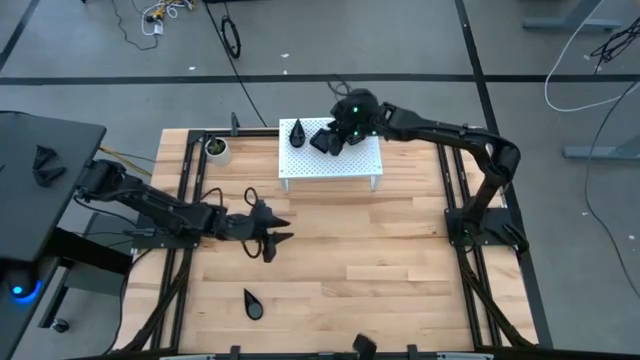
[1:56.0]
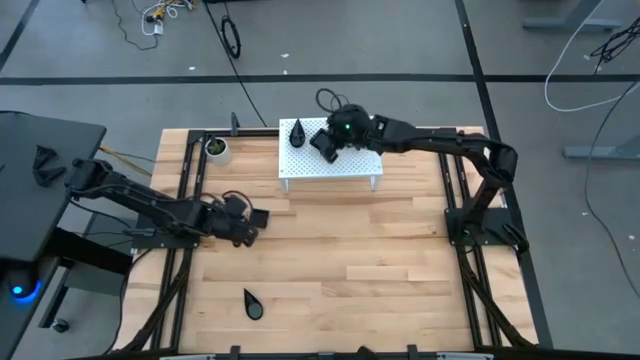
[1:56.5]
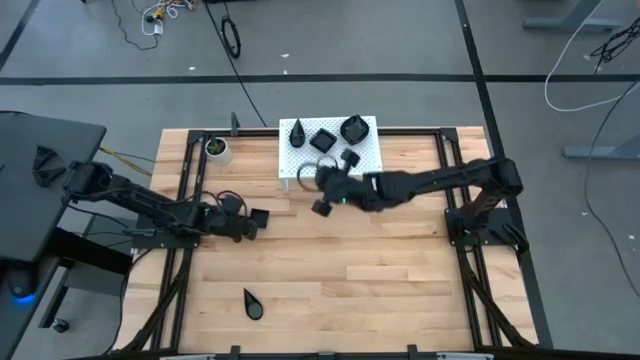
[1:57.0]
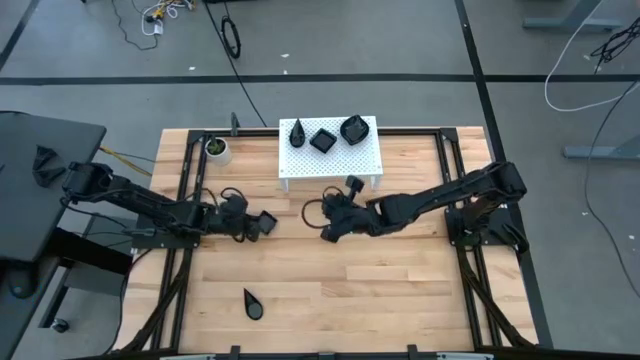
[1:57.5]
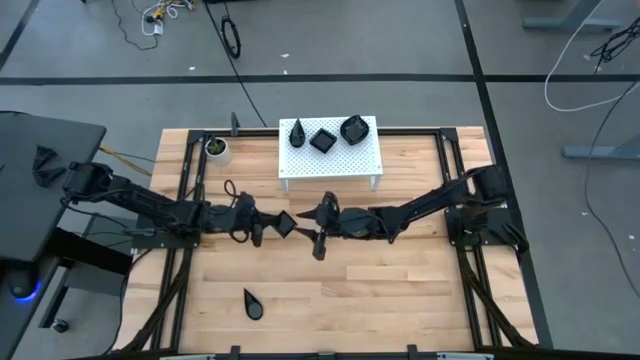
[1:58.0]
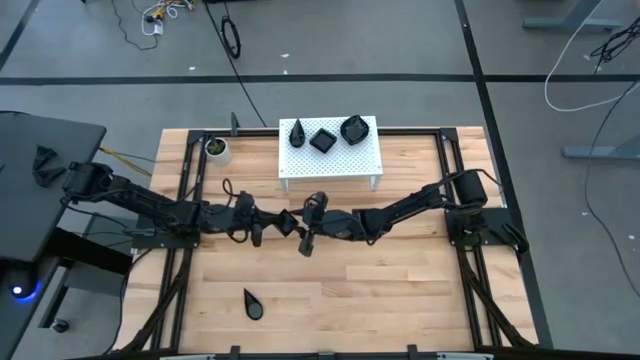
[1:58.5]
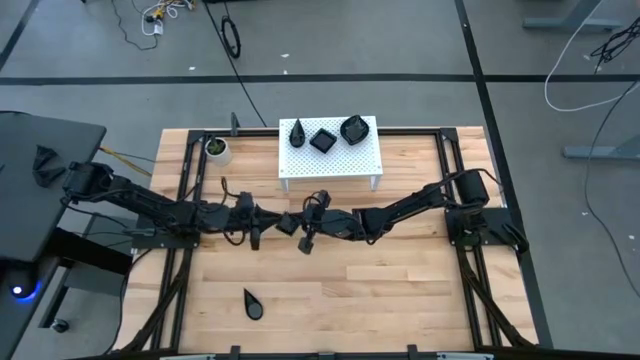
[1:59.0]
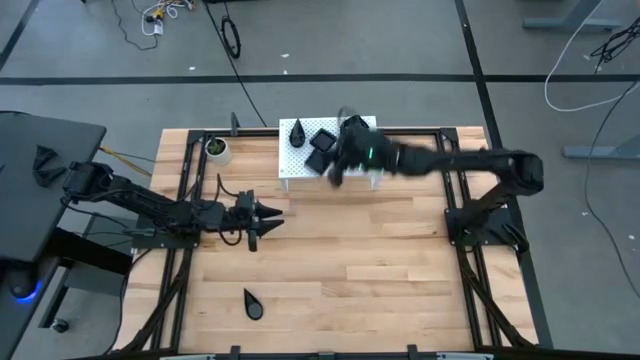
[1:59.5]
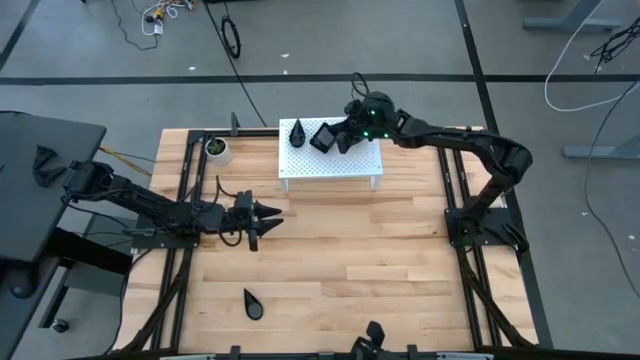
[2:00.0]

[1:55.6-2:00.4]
Task: Pick & Place Mini shaped plates
Stack the black square plate on top of the other black square plate on the shelf

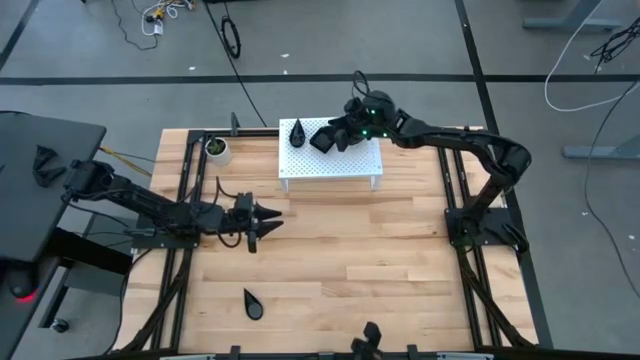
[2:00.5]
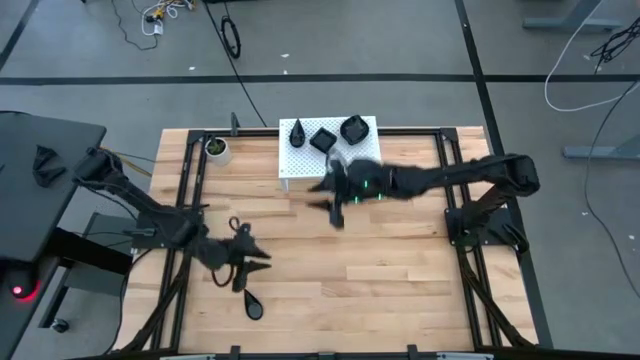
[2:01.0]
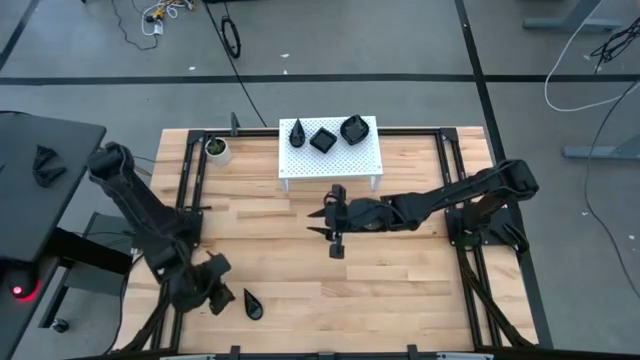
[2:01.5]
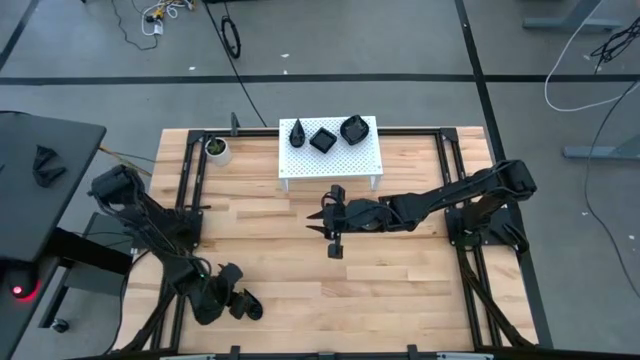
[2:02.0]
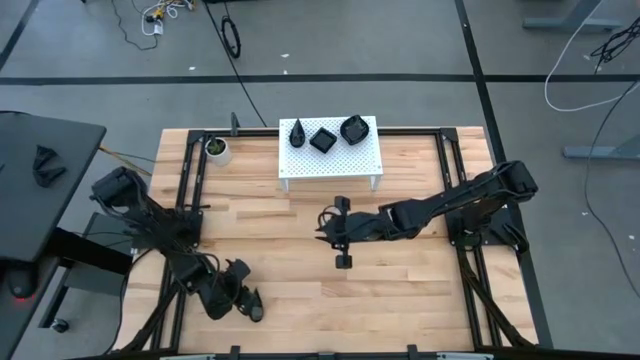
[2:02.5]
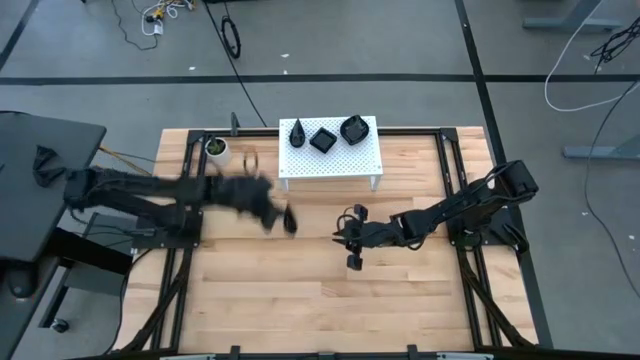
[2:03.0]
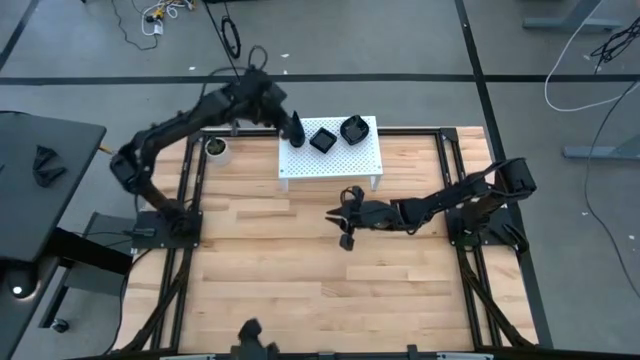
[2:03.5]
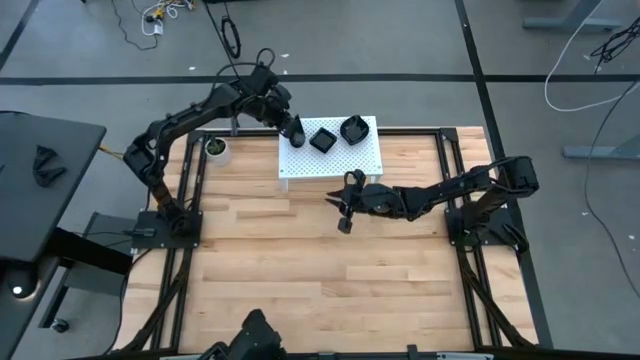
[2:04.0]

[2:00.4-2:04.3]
Stack the black drop-shaped plate on top of the other black drop-shaped plate on the shelf

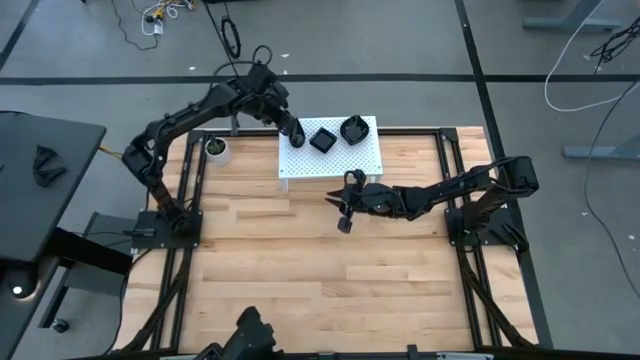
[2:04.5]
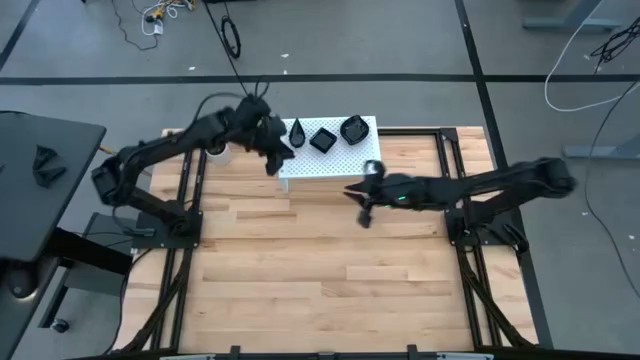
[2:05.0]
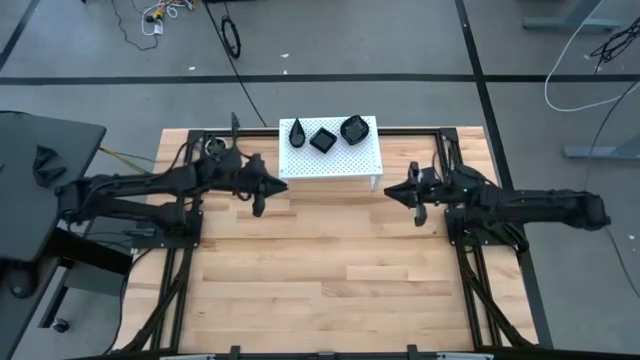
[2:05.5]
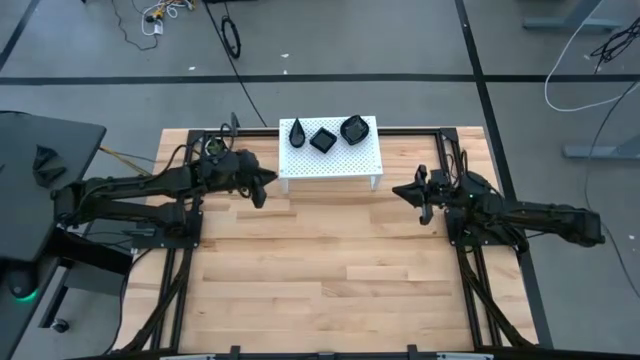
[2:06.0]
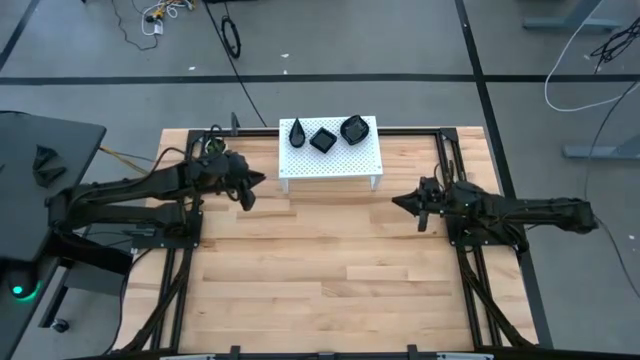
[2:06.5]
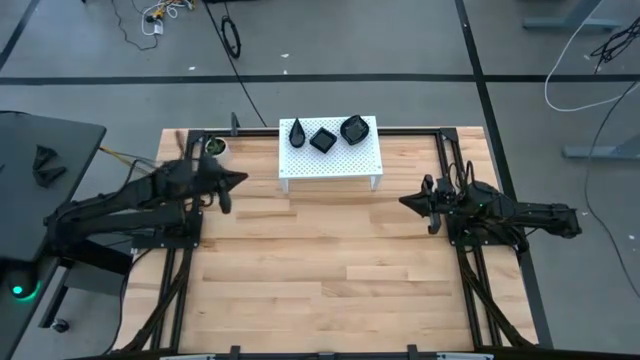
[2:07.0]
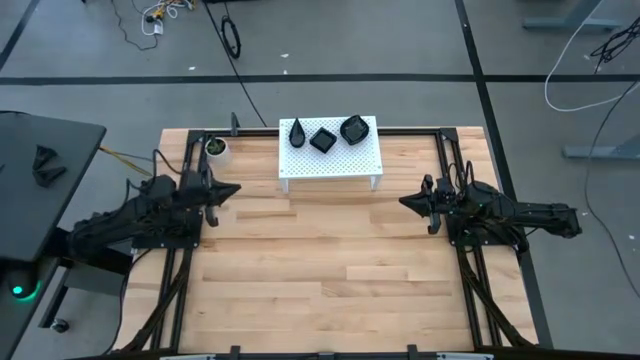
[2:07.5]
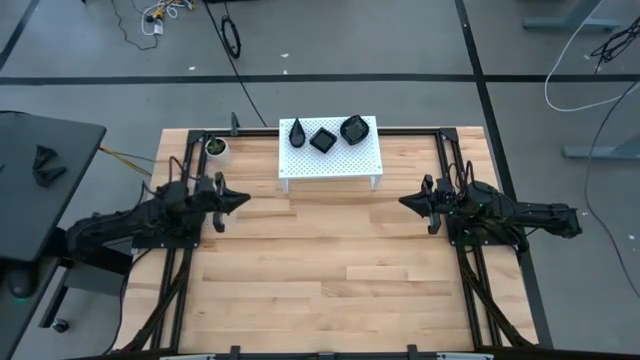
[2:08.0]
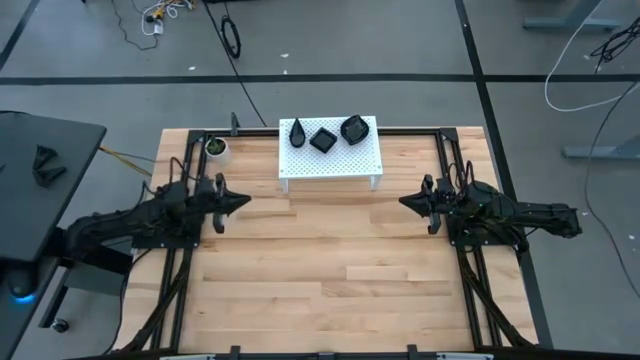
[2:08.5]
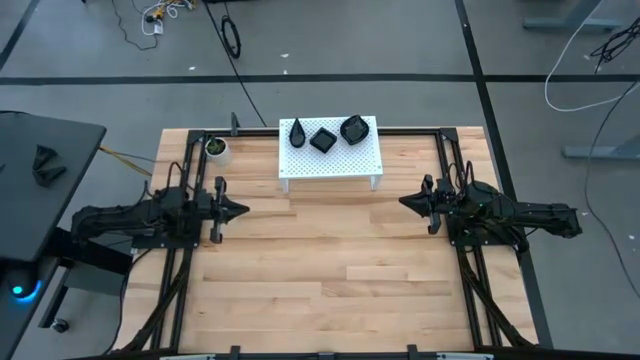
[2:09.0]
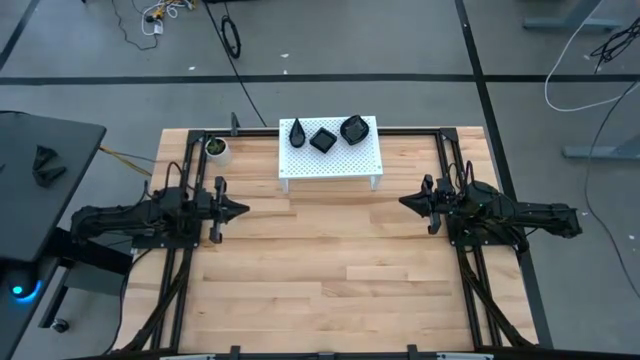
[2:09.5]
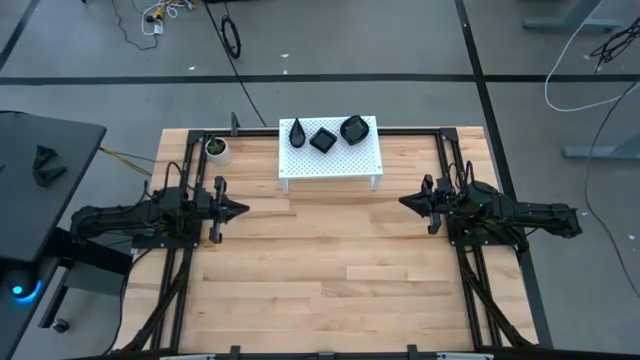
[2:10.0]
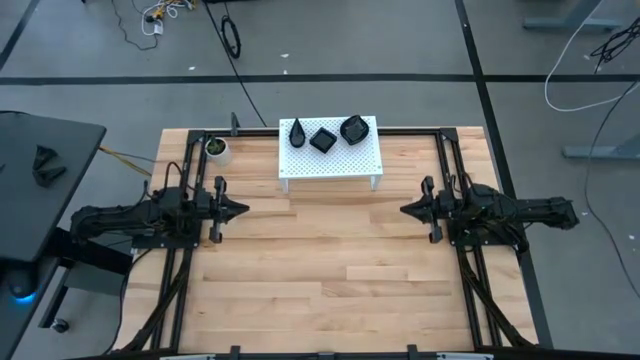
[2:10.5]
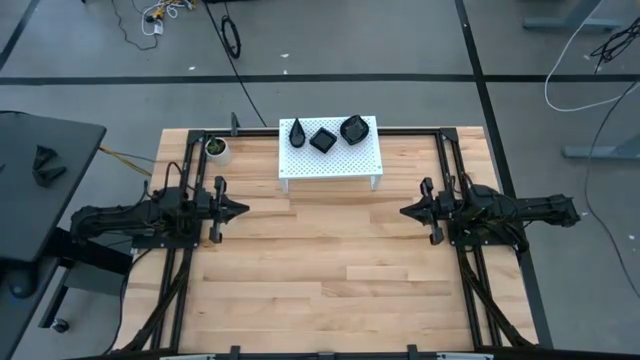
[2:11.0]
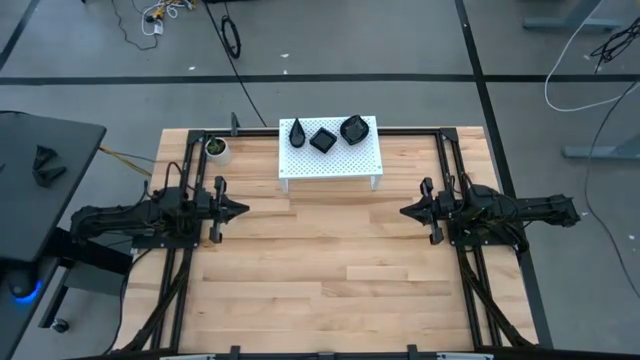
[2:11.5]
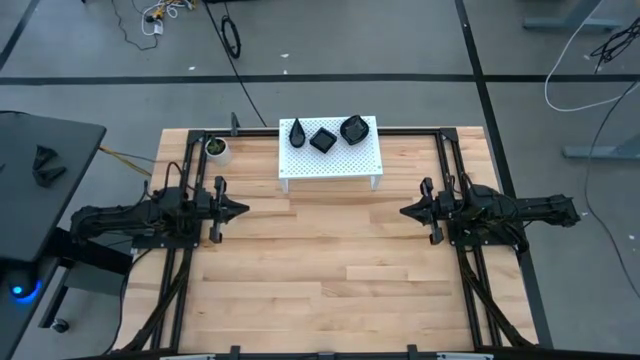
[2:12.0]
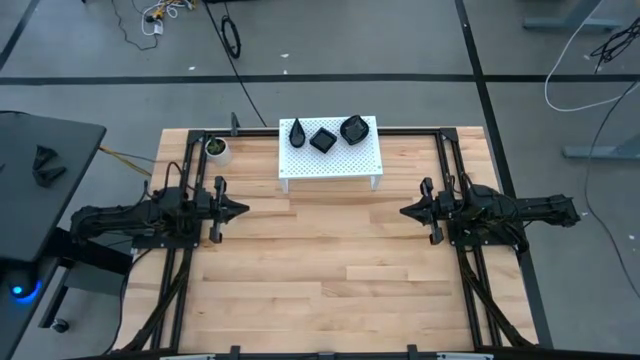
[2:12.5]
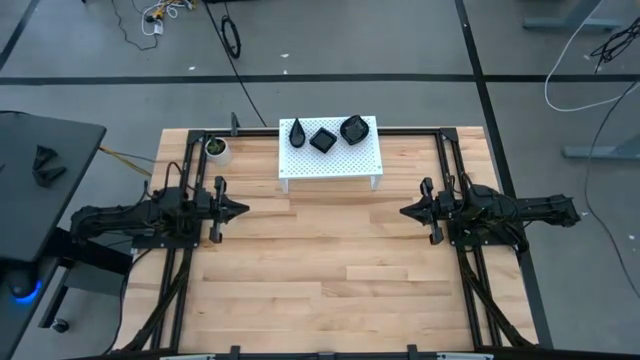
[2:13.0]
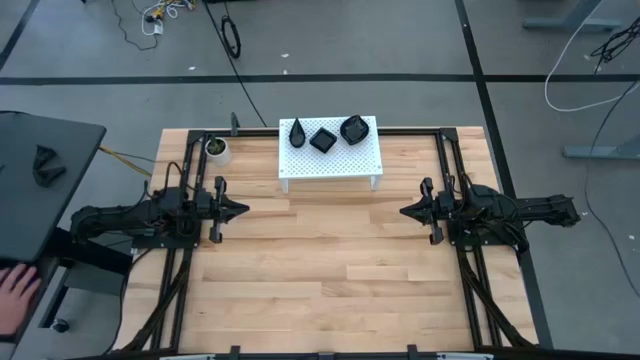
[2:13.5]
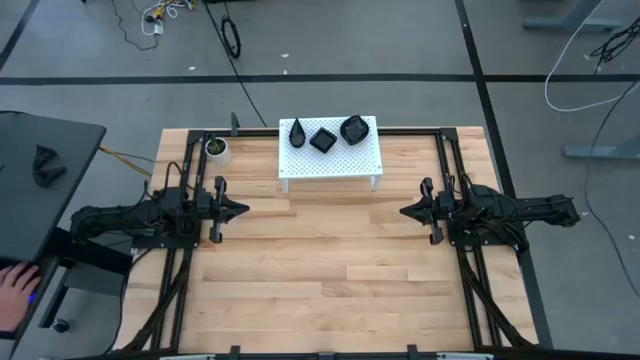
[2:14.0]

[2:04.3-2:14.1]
Return to Home Position
